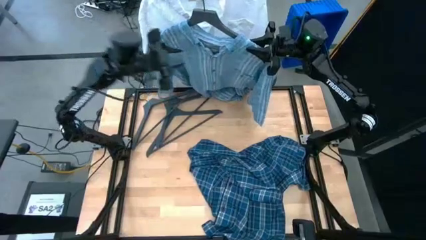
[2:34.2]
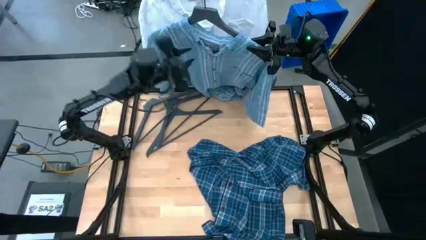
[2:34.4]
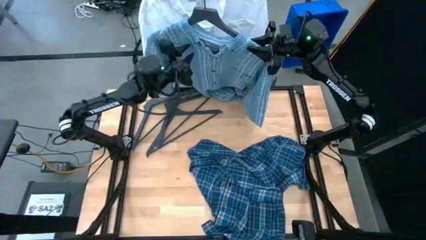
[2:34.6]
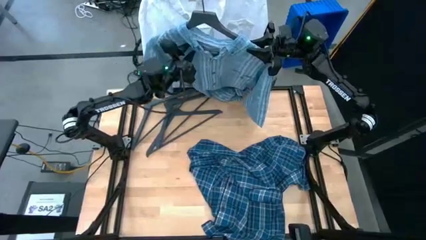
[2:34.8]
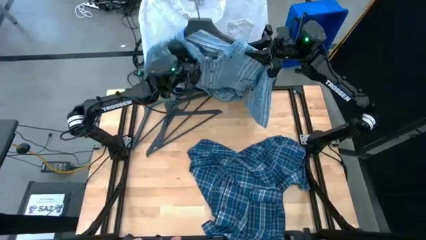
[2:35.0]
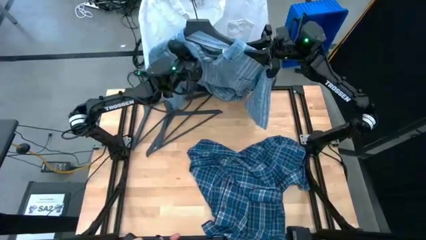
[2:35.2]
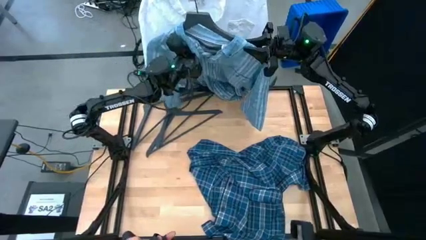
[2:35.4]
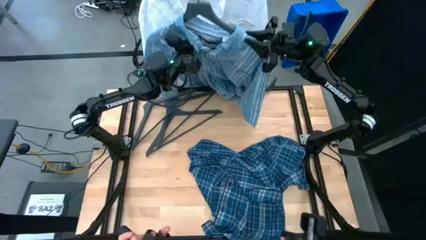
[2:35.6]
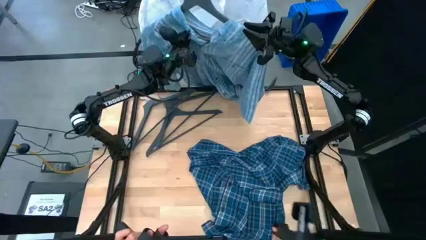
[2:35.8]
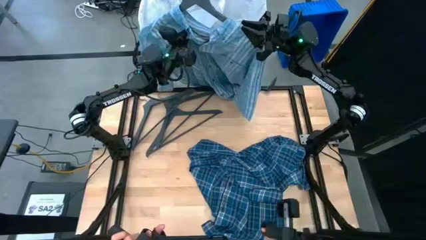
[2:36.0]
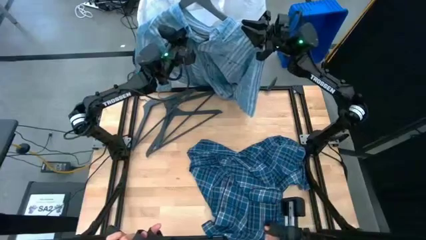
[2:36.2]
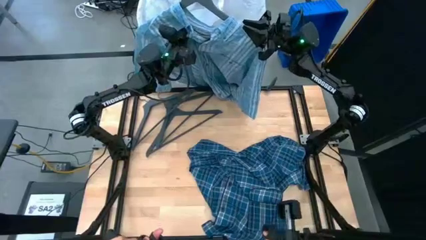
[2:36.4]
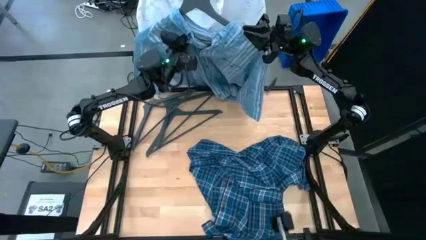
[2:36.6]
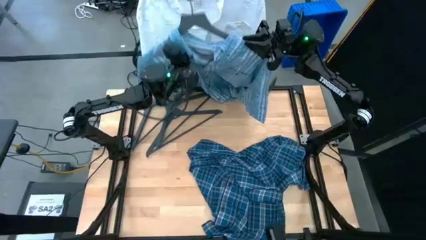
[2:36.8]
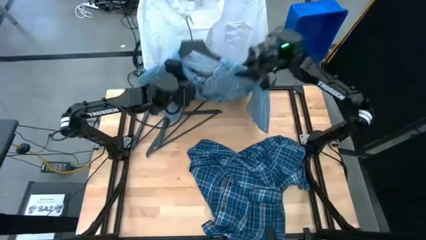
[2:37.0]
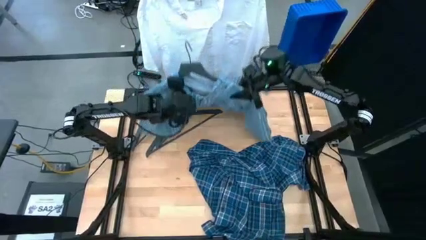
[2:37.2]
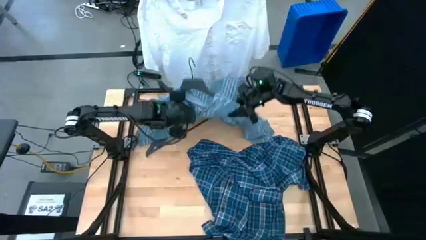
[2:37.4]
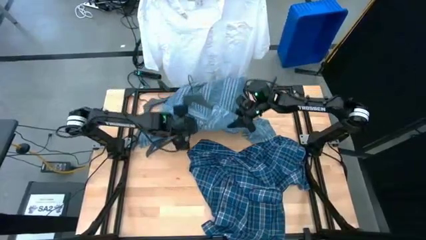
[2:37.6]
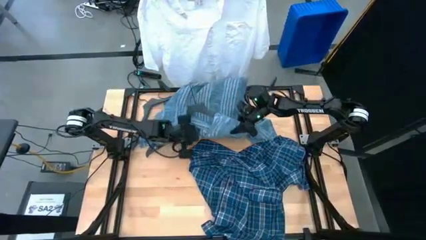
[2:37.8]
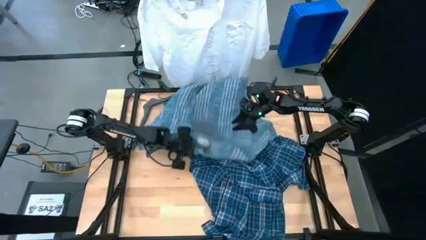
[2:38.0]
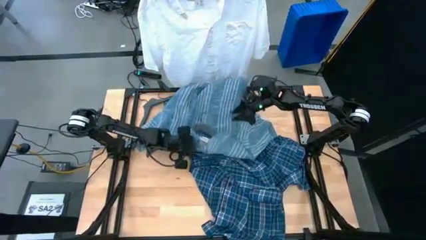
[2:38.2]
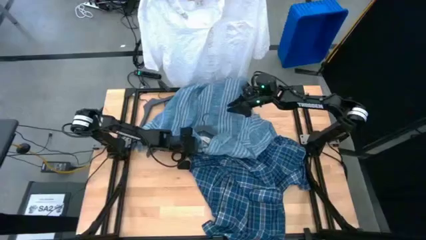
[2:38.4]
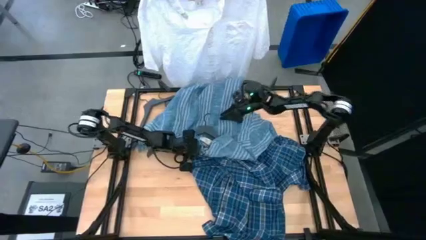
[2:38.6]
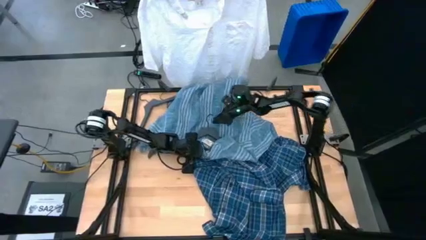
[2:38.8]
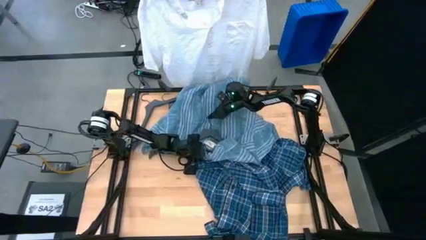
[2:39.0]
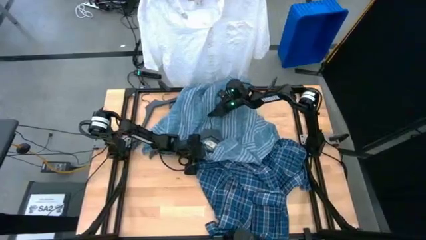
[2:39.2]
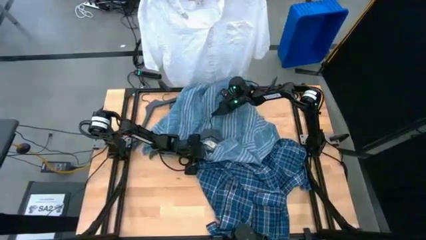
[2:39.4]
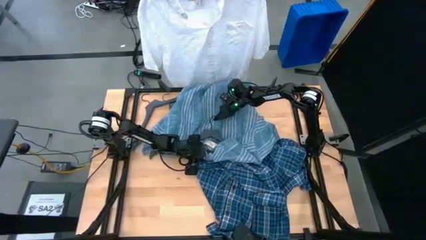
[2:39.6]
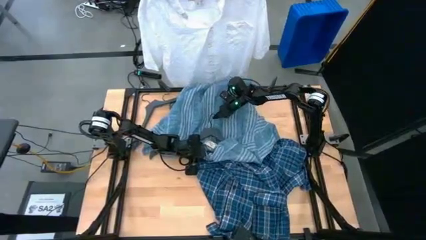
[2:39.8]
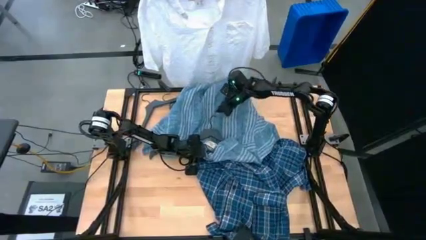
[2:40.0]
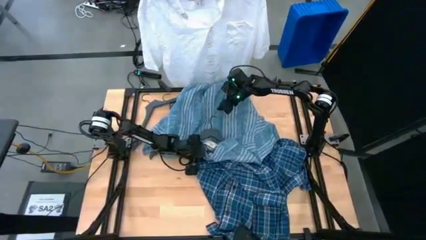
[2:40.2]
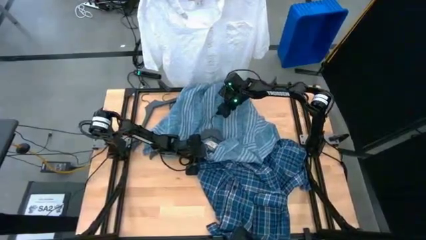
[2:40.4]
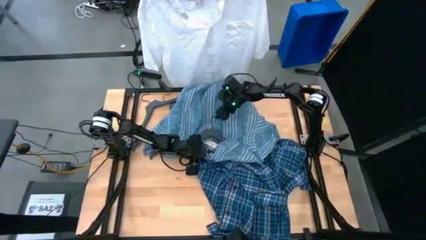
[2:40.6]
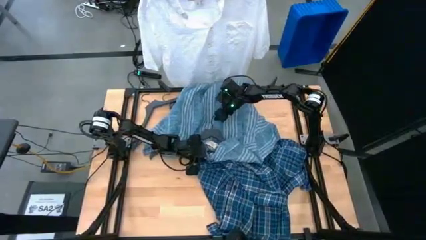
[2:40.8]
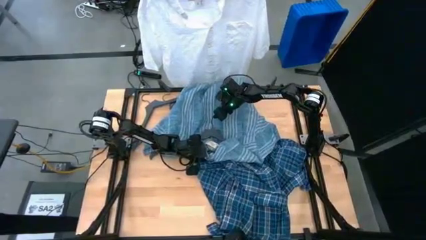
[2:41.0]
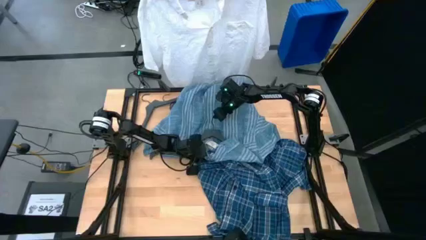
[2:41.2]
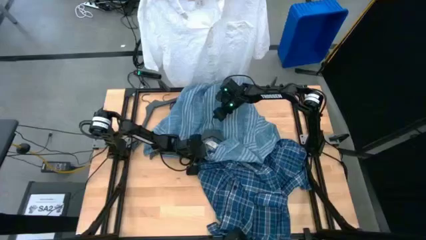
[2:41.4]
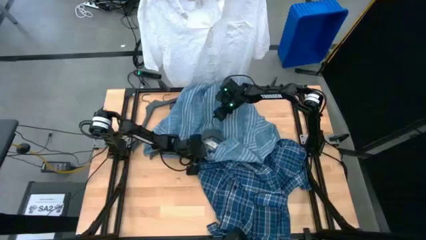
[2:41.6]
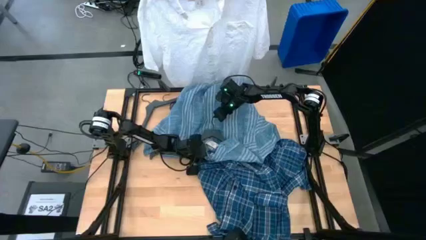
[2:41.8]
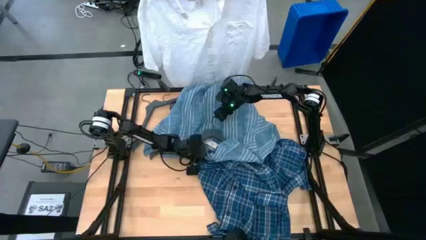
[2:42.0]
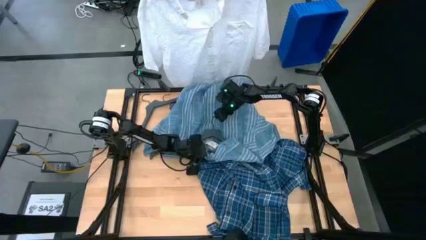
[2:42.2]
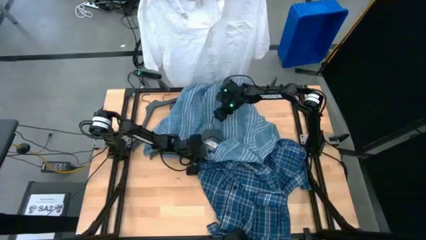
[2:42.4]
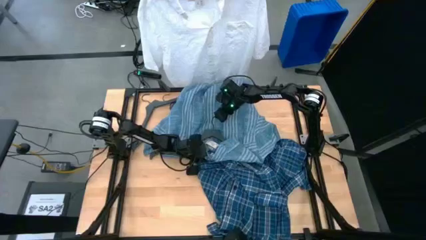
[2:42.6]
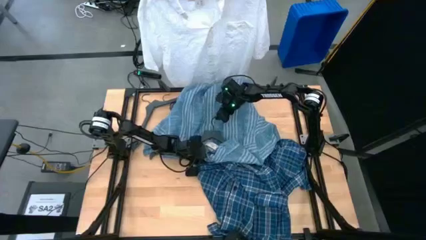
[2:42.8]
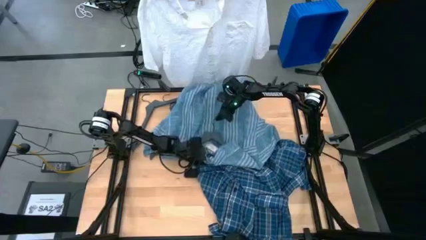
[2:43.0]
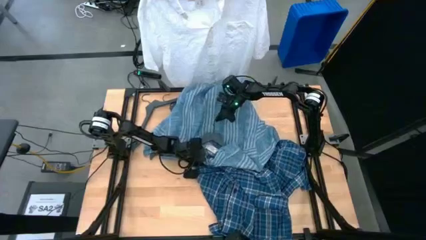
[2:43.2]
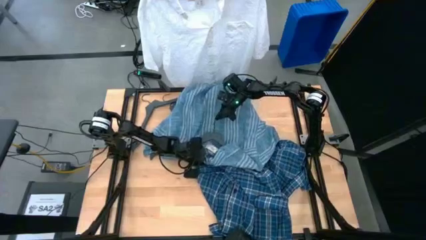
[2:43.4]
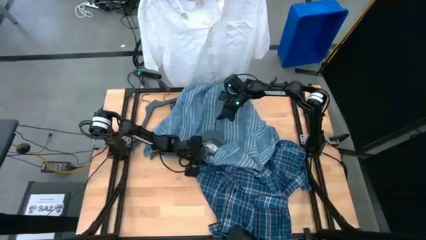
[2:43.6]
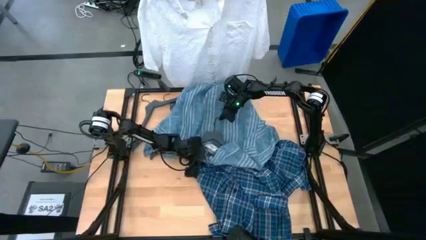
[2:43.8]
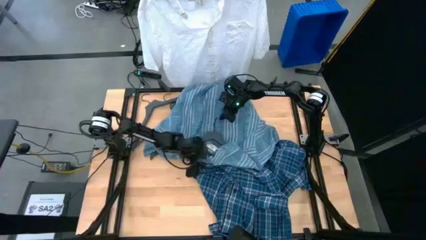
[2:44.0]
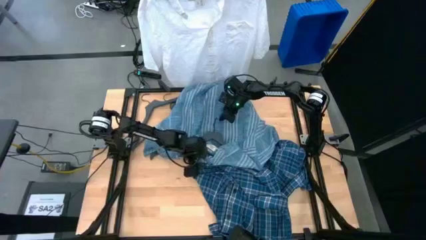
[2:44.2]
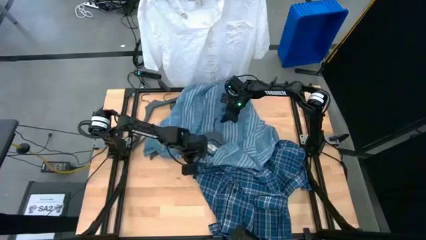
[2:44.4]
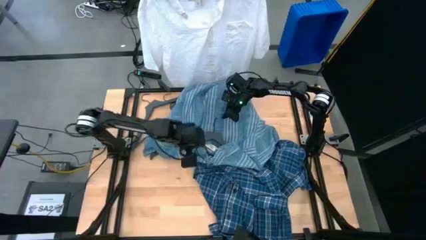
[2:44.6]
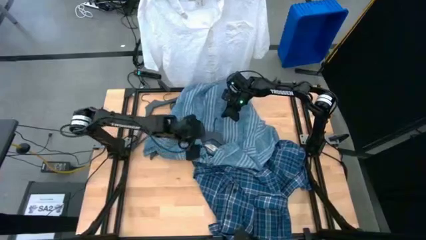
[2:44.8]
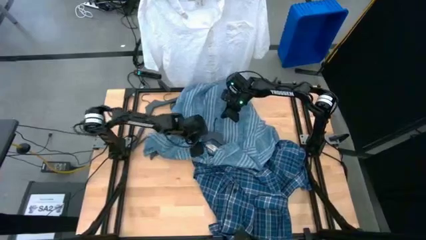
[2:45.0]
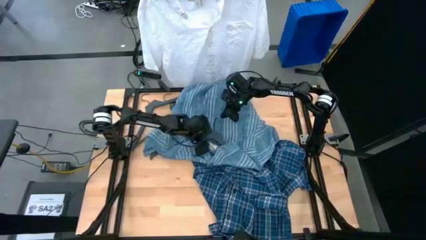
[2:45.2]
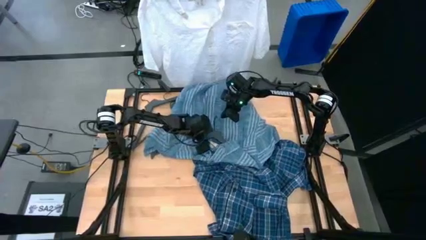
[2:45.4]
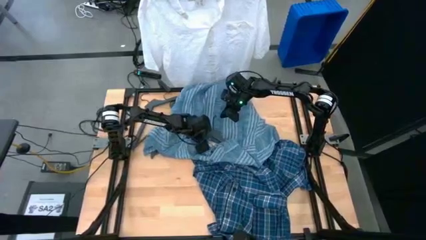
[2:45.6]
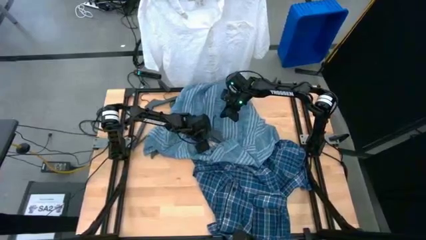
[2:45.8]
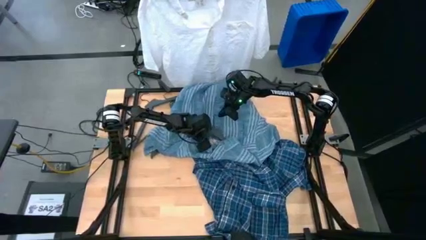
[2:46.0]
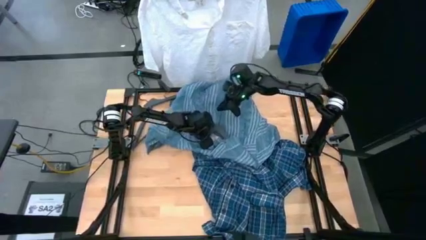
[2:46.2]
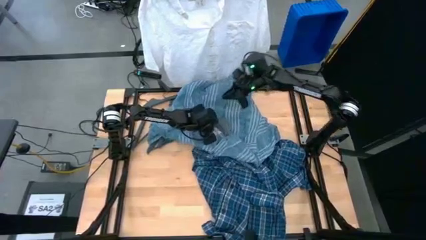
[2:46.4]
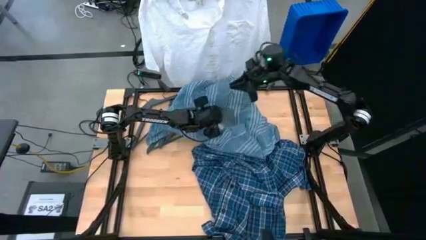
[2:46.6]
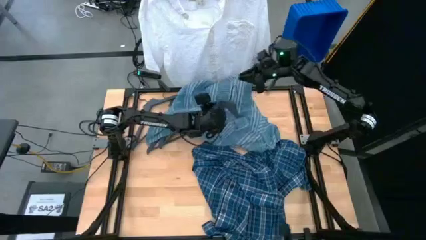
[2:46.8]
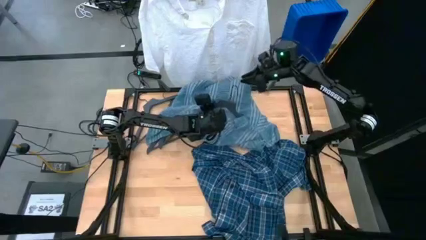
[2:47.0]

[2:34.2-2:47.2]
Task: Hang clothes
Hang the green shirt on the hanging rack

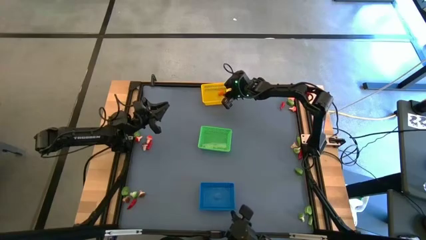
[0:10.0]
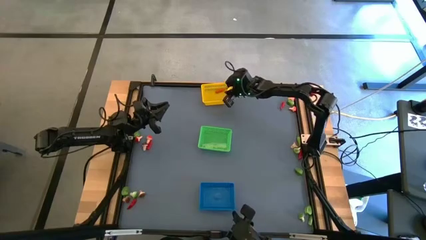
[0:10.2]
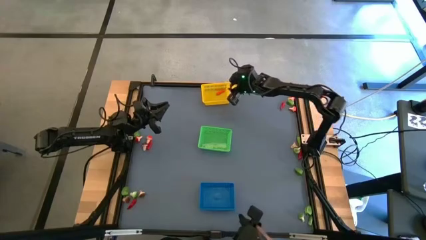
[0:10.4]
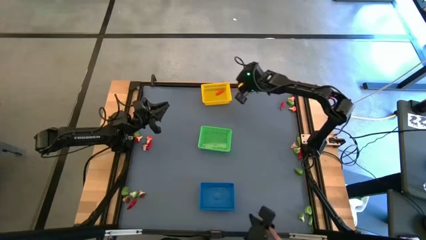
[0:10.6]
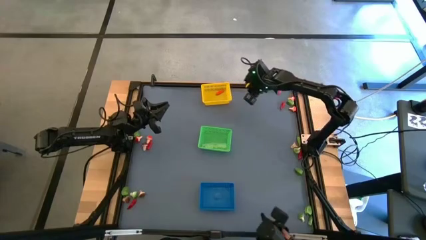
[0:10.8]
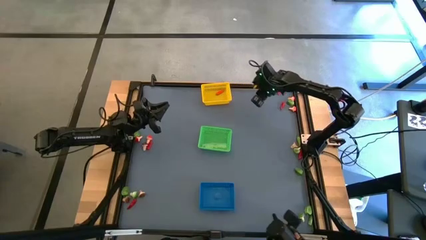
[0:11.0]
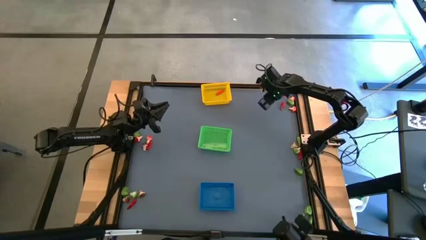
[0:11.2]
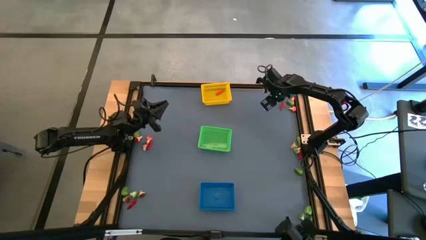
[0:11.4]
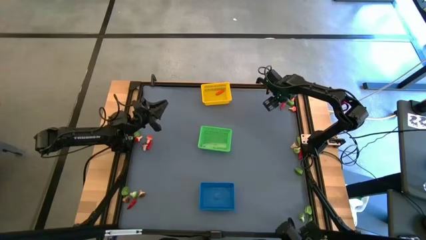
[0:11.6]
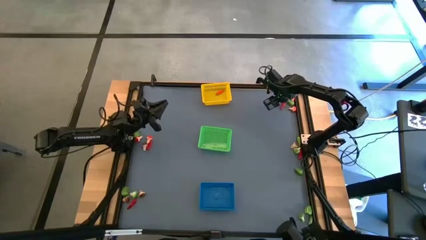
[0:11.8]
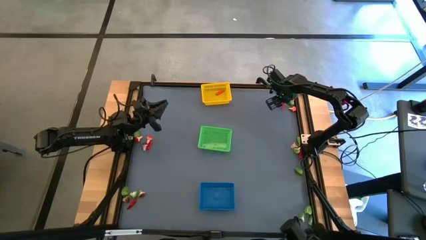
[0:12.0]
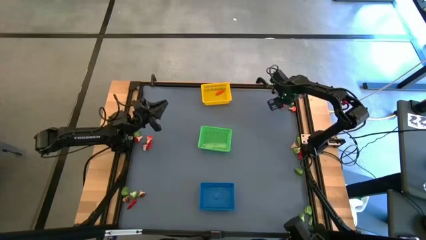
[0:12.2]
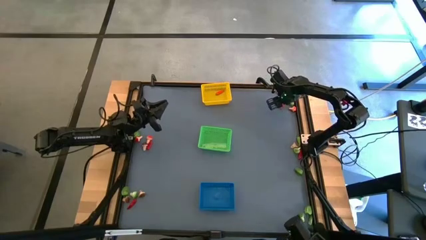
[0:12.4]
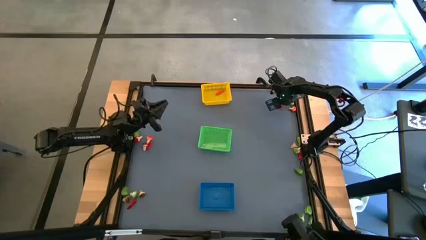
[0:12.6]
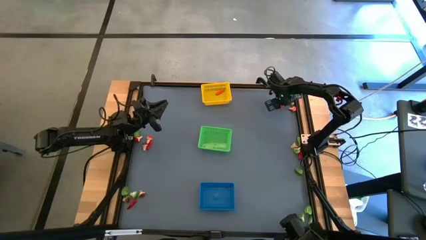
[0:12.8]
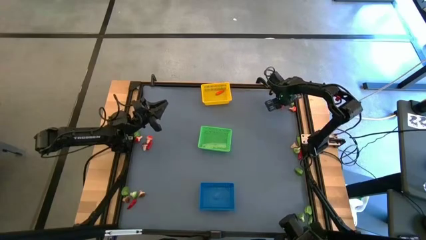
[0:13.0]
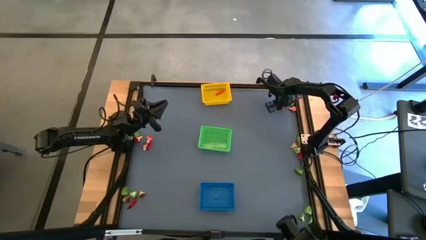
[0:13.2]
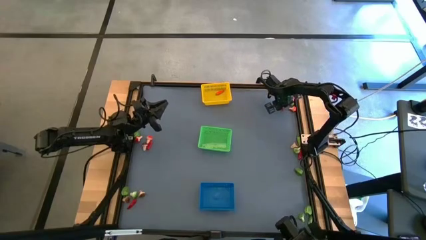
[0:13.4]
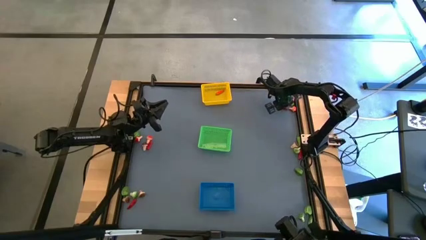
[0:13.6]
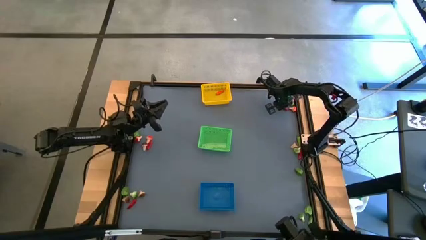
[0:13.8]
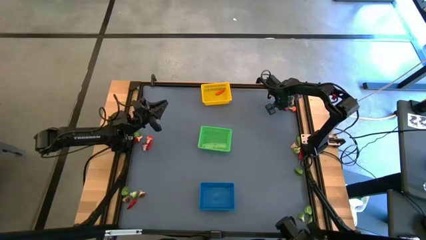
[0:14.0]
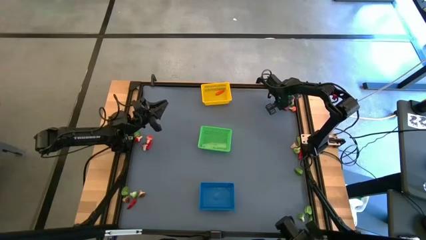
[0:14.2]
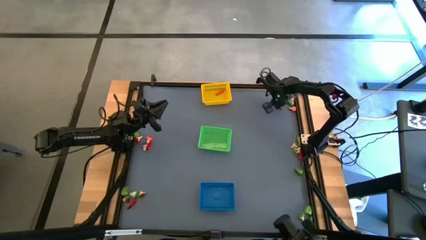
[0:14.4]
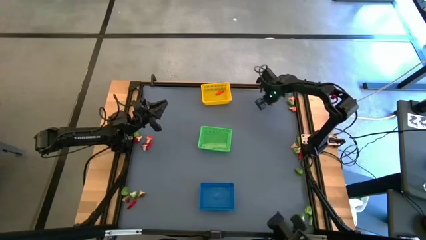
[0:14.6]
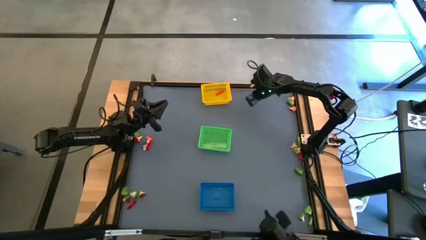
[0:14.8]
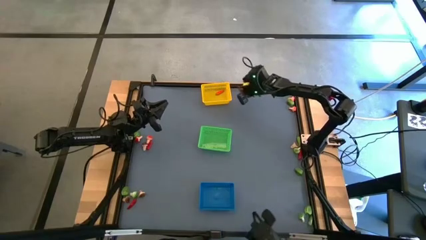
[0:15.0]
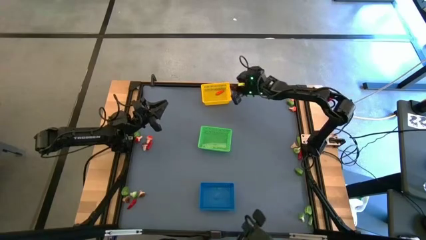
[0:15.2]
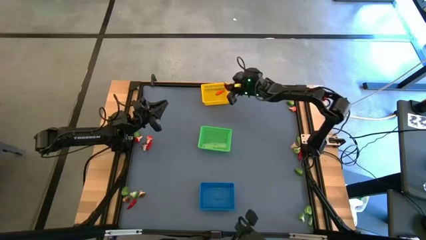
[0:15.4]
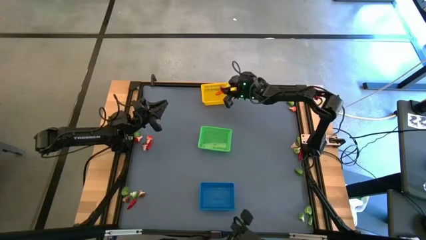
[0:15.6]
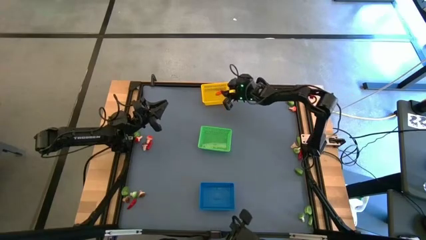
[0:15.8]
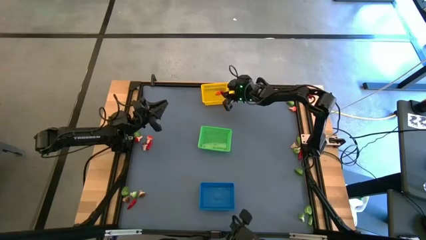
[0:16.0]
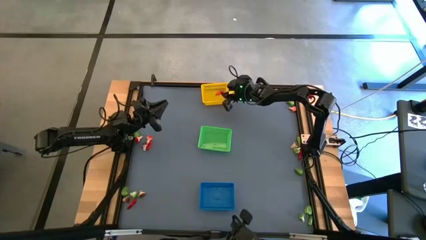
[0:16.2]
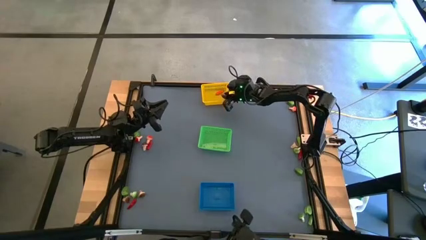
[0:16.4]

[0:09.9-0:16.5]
Task: Sort produce into baskets
Put the red chili pepper into the yellow bin
